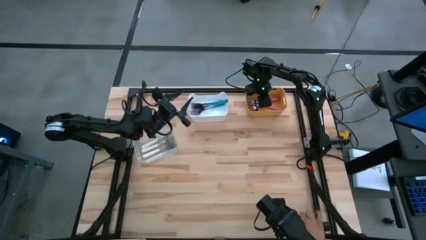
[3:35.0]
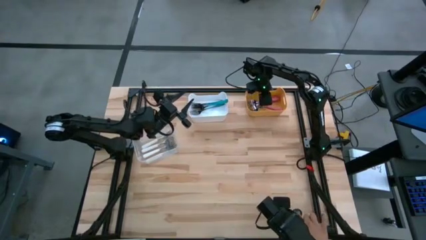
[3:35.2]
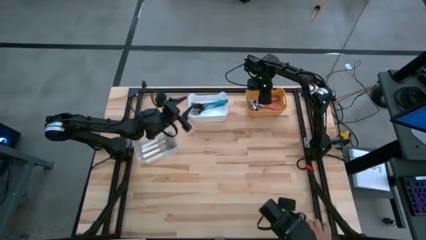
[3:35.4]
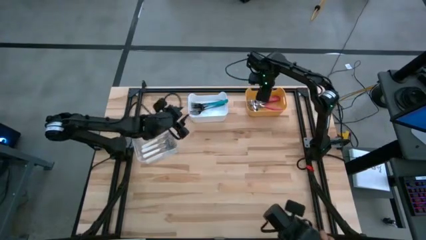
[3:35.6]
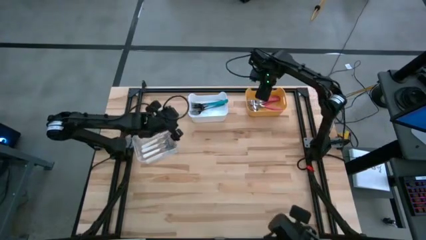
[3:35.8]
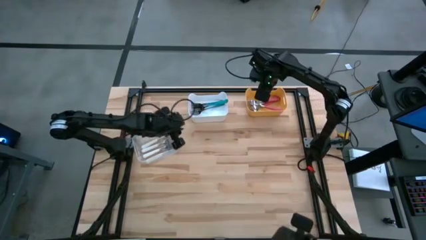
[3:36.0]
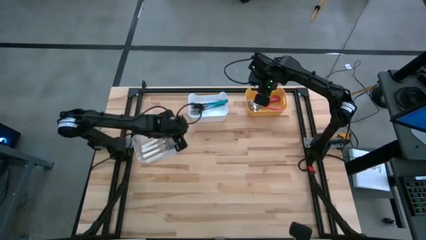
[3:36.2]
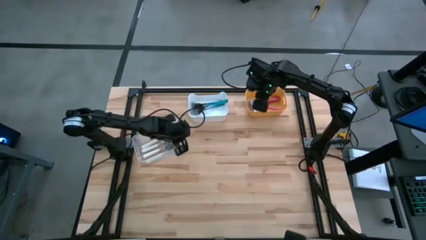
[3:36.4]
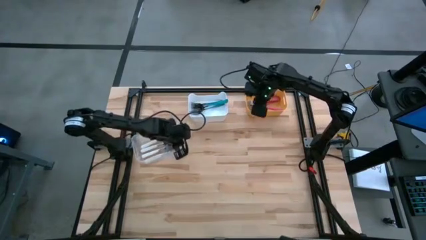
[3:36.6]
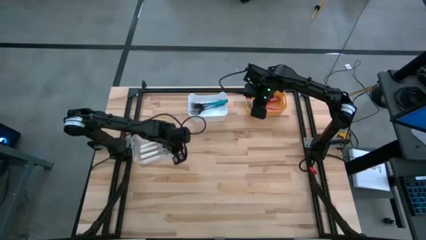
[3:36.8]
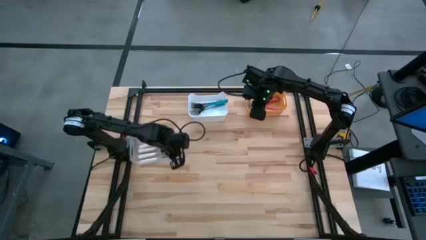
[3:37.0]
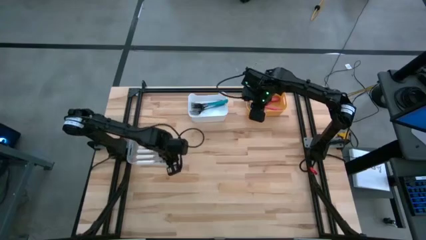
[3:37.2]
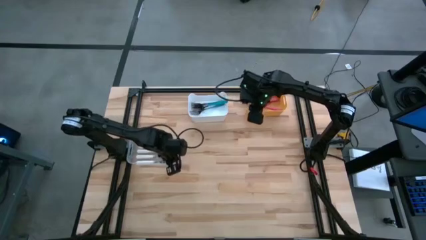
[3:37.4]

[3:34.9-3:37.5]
Task: Sort silverware by color (type)
Adjust the transparent bin

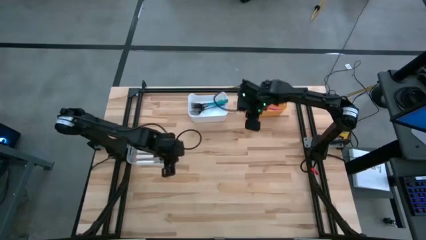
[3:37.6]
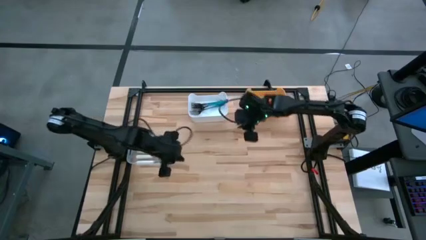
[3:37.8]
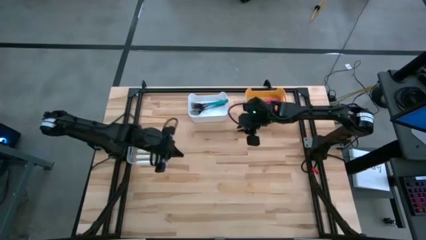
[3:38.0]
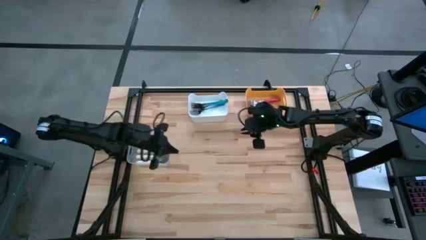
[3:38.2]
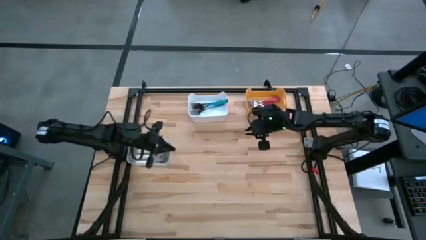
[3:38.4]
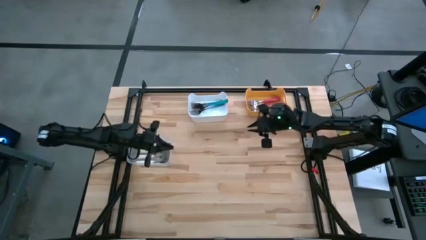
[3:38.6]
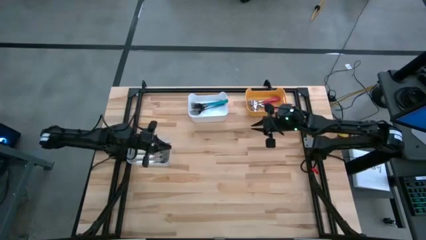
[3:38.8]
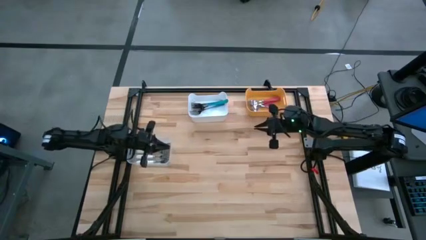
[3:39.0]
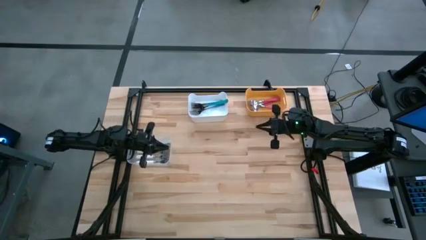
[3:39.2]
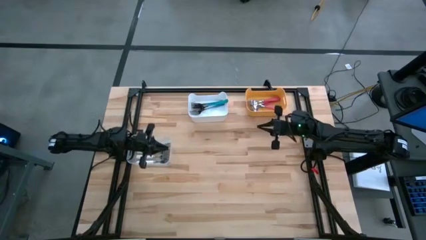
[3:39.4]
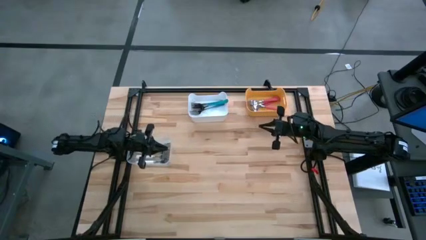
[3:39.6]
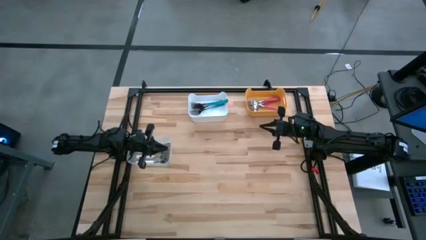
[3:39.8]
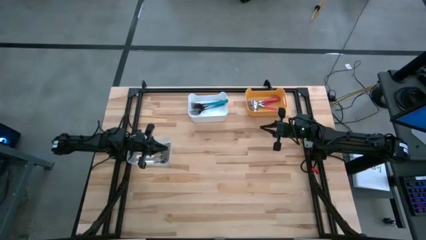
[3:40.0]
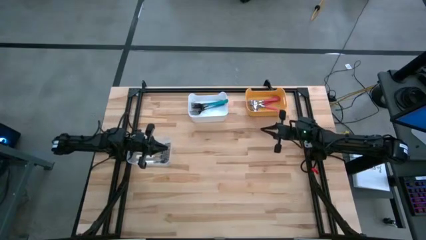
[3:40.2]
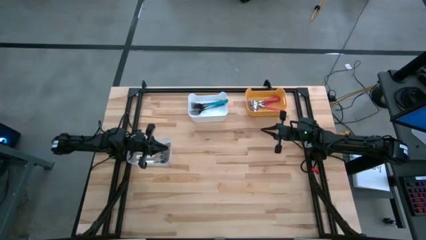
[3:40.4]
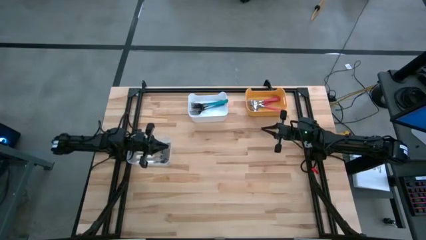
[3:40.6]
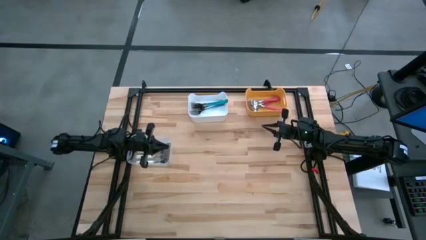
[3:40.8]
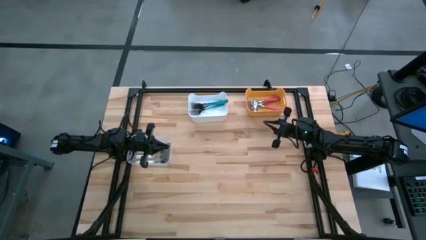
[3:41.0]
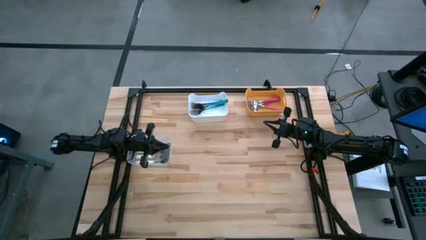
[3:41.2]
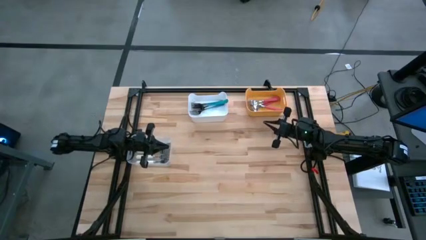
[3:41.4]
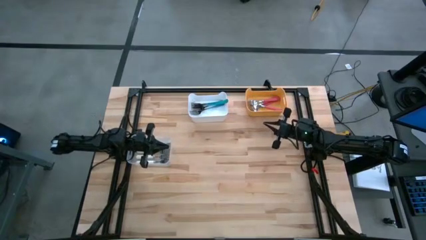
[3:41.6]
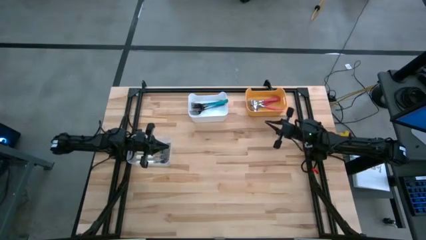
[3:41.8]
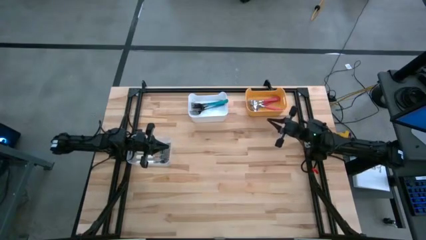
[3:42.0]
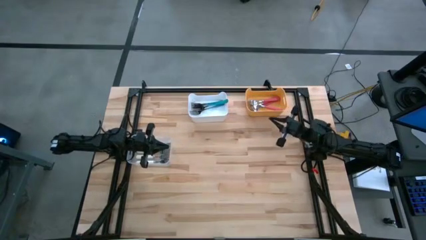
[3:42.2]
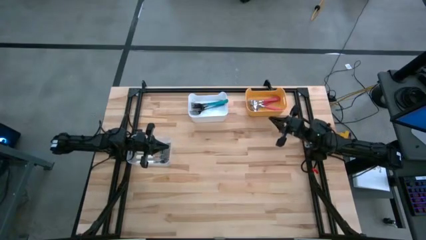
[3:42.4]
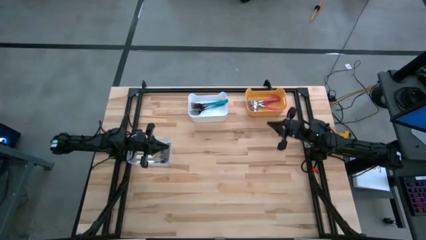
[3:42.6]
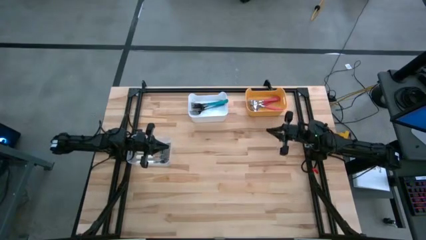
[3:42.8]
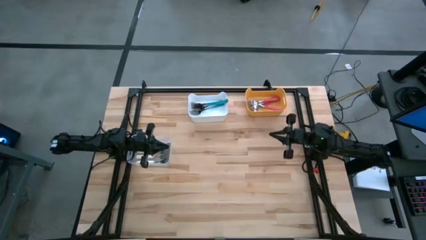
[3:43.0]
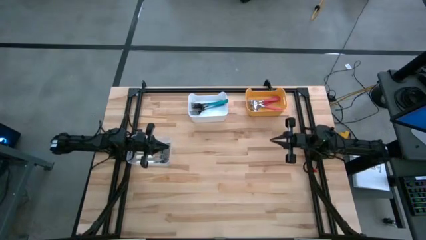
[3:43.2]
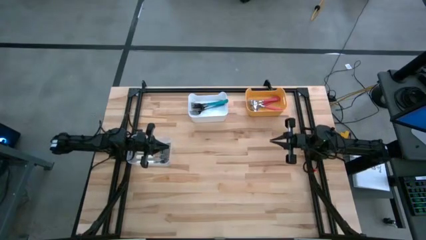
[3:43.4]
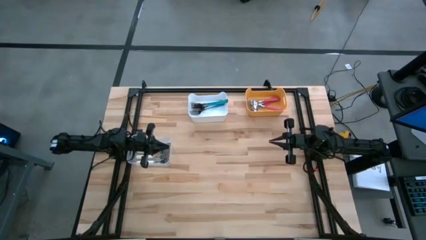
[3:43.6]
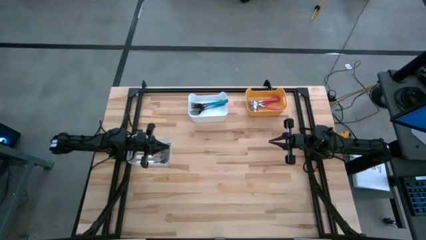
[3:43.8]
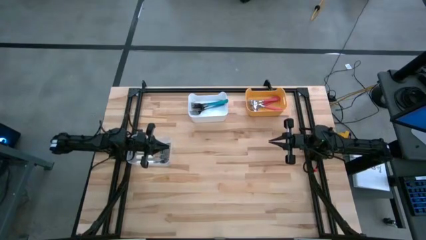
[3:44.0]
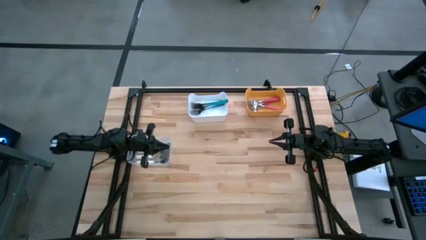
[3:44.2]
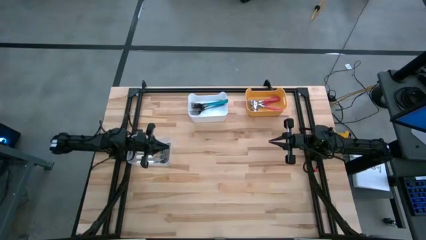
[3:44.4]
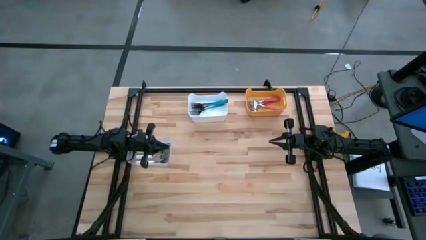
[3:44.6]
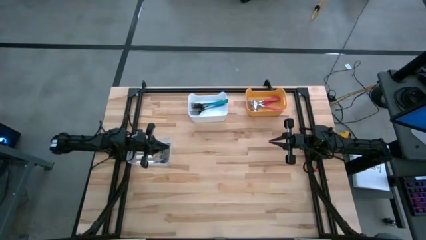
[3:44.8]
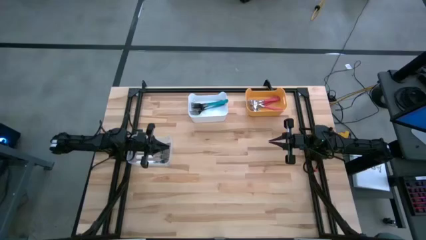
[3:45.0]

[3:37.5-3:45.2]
Return to Home Position

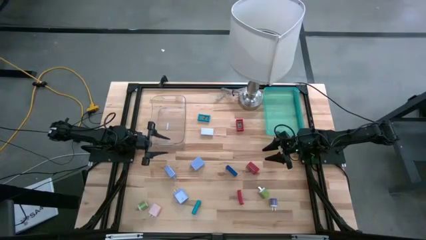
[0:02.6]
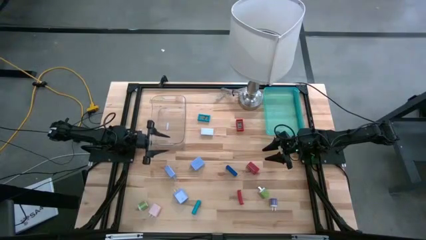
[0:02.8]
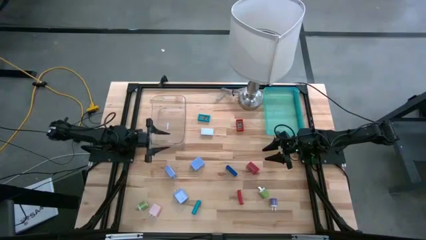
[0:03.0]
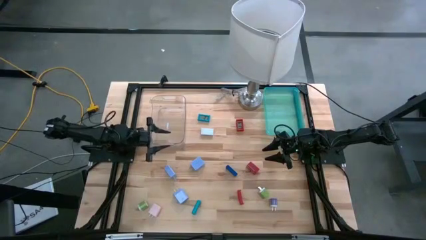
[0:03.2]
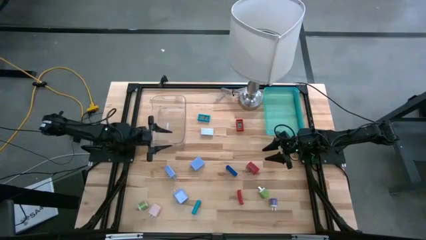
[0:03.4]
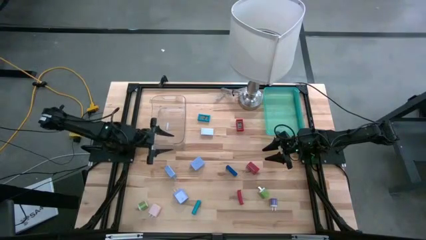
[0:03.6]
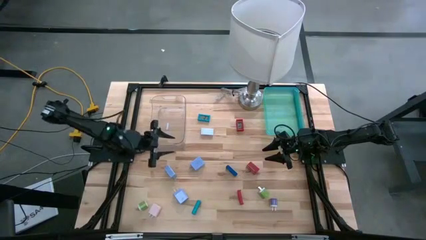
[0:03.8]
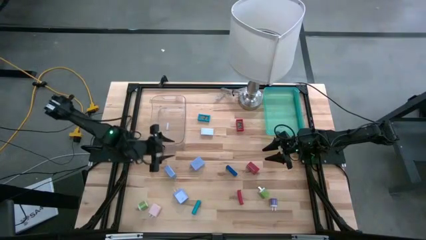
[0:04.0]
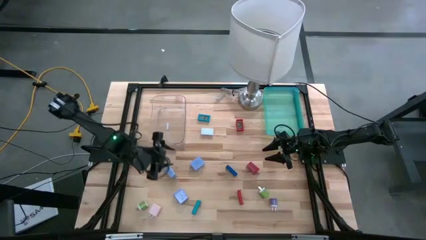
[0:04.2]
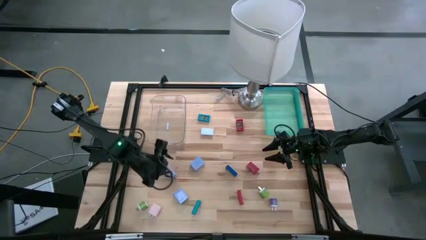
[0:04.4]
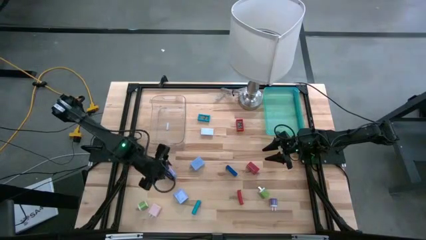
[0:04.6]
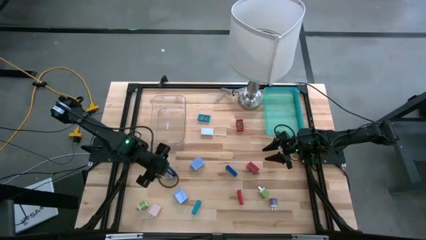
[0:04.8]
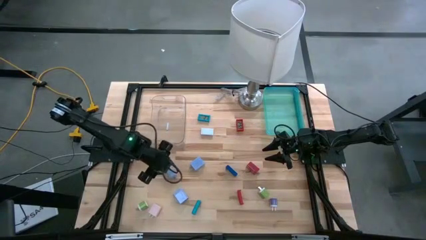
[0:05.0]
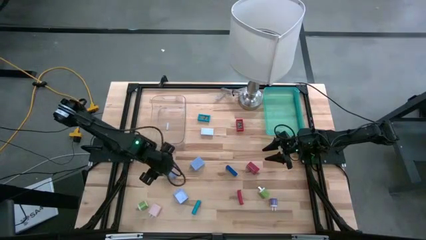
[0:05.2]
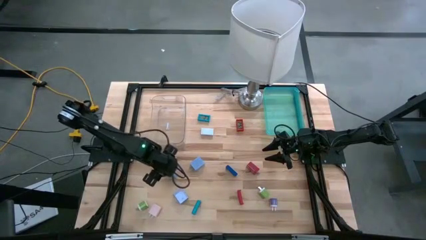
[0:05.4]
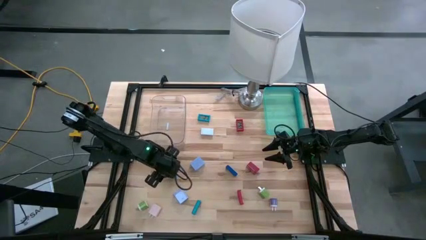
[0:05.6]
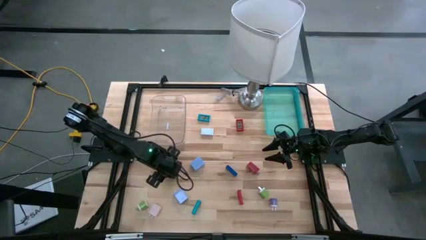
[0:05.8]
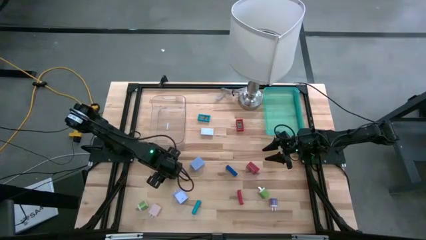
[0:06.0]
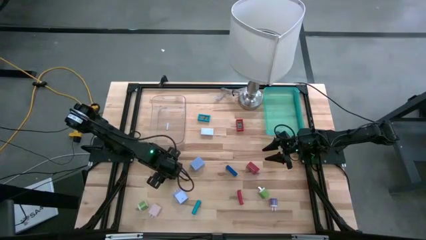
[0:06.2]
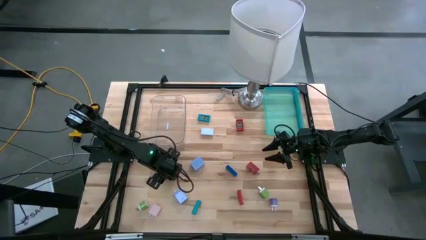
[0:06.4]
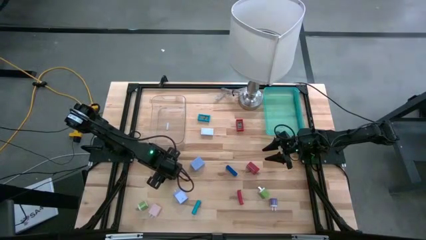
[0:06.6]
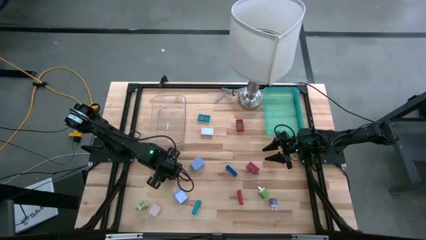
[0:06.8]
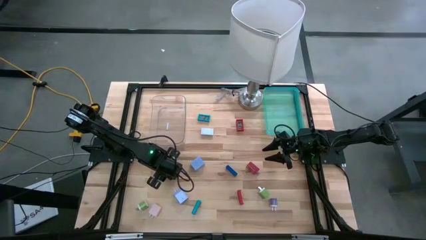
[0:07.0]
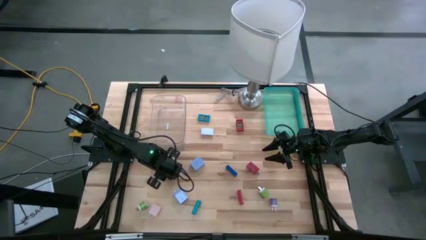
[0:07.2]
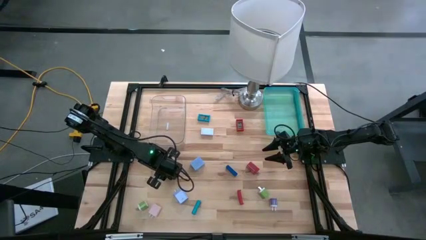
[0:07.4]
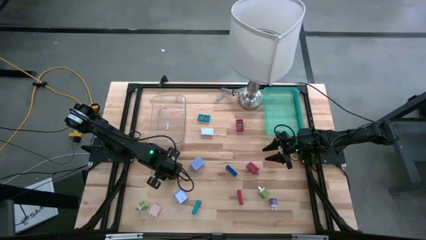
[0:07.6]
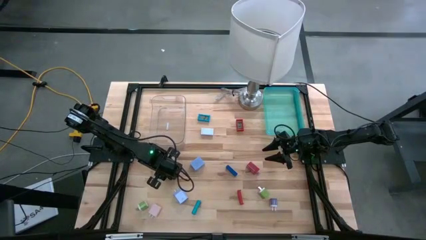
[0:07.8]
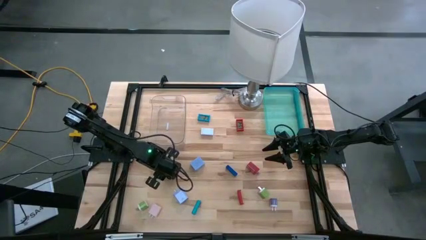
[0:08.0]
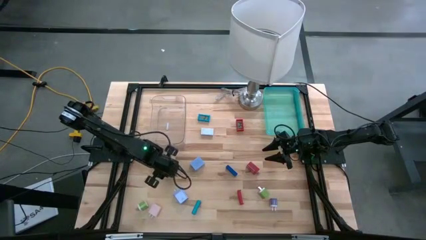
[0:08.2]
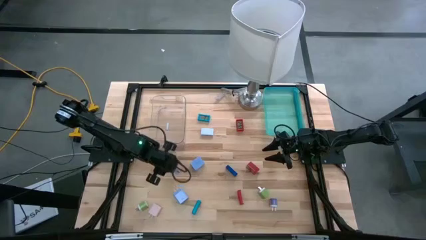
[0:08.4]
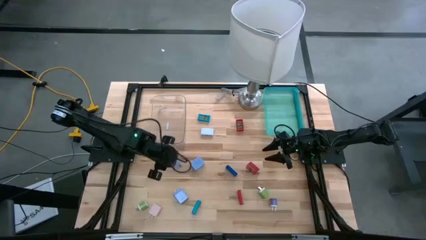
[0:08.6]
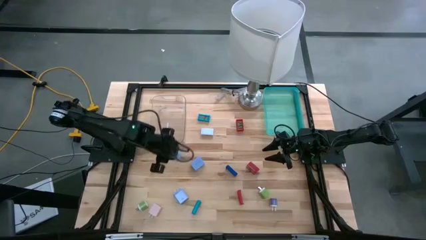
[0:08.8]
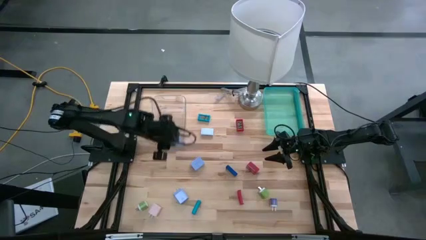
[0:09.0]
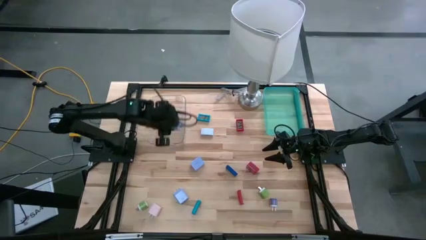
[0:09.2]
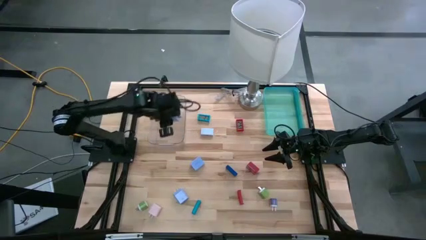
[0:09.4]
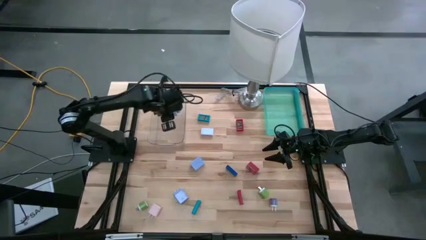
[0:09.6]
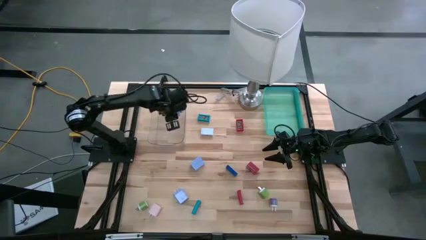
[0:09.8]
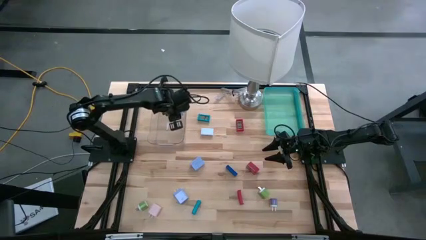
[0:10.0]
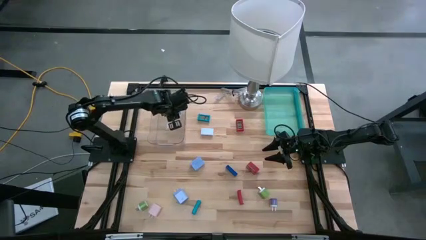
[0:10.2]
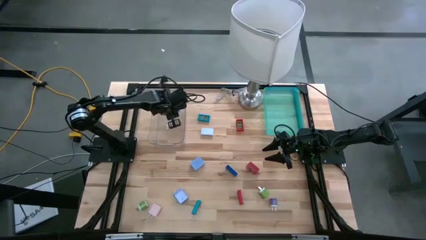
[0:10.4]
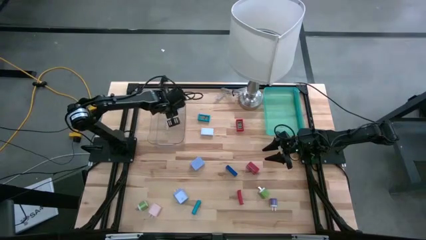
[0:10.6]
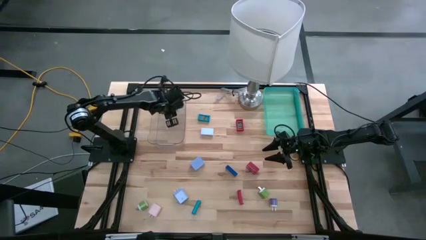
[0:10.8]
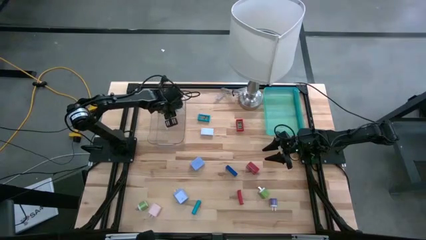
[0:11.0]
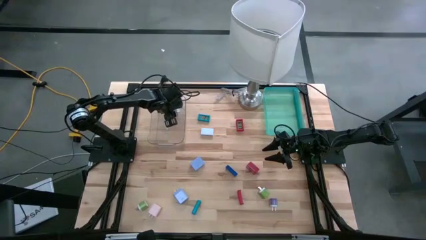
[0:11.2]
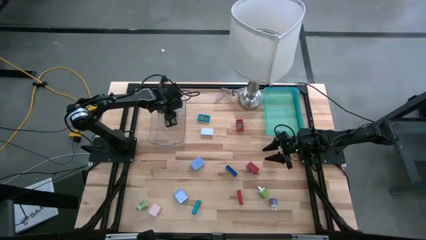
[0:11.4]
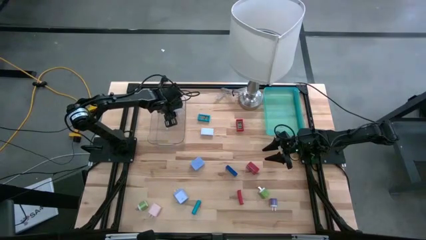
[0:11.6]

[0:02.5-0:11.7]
Task: Pick & Place Office items
Put the middle left blue charger adapter into the transparent bin
